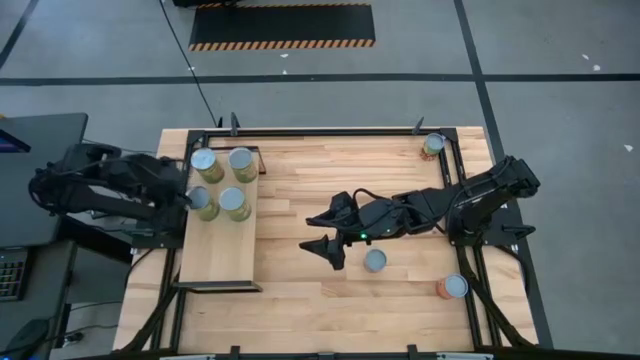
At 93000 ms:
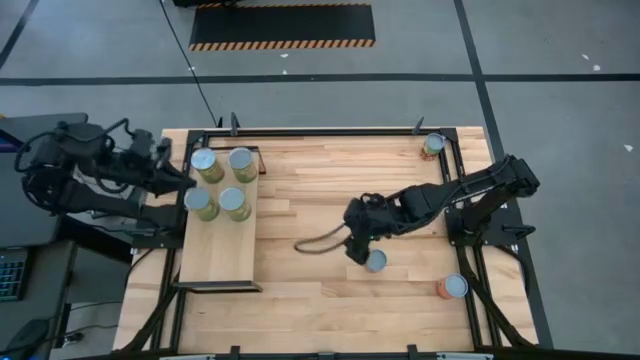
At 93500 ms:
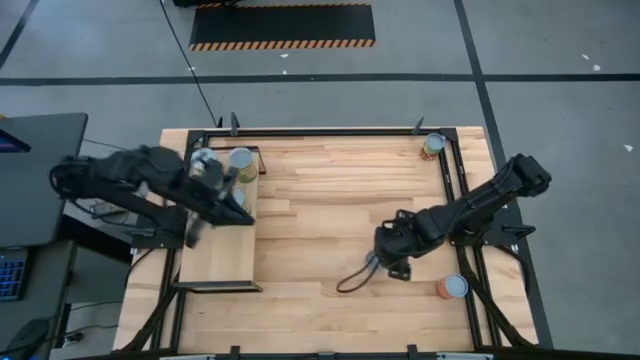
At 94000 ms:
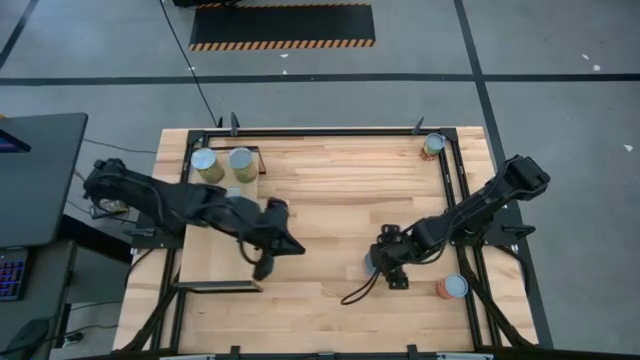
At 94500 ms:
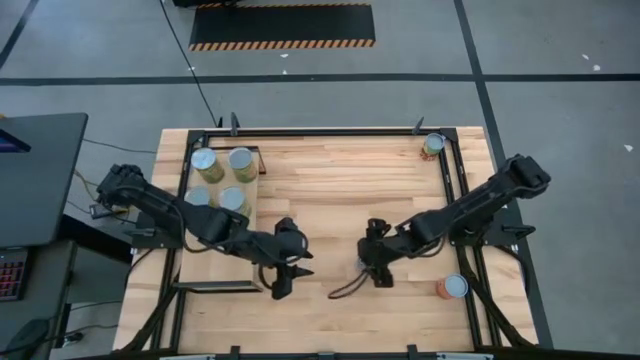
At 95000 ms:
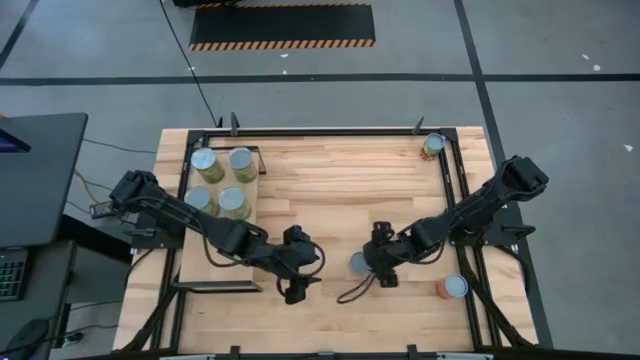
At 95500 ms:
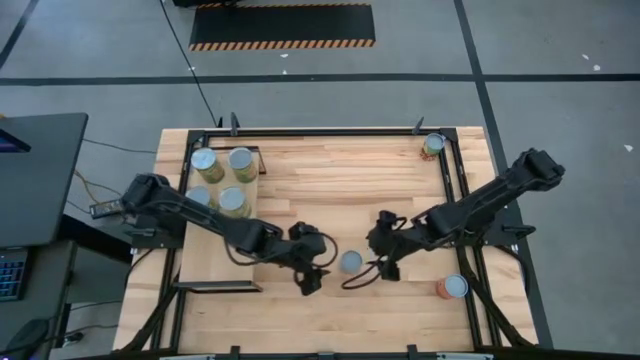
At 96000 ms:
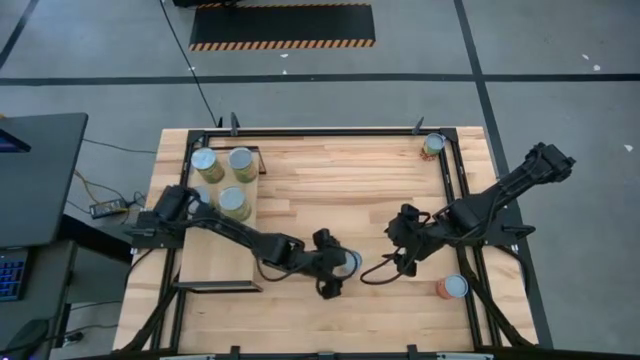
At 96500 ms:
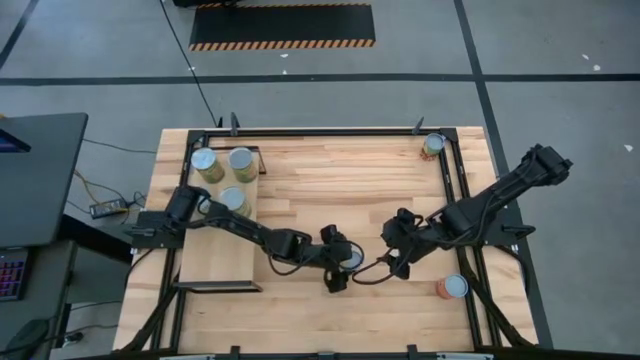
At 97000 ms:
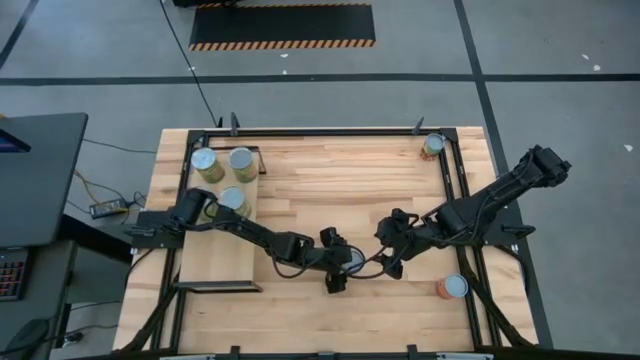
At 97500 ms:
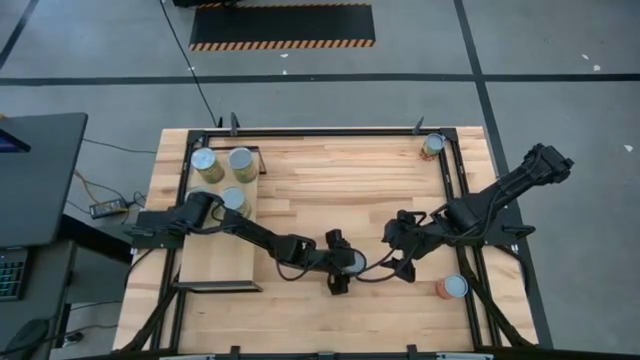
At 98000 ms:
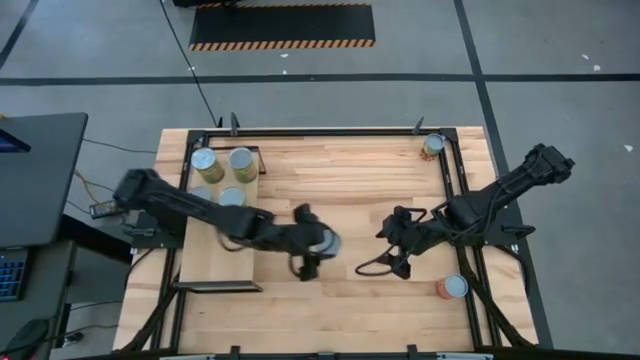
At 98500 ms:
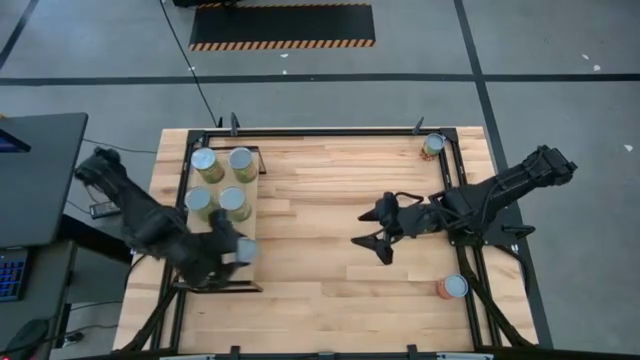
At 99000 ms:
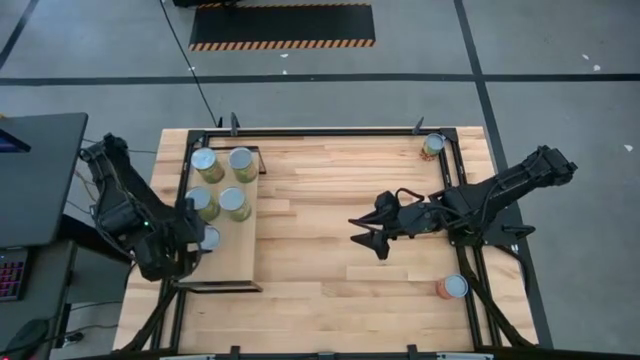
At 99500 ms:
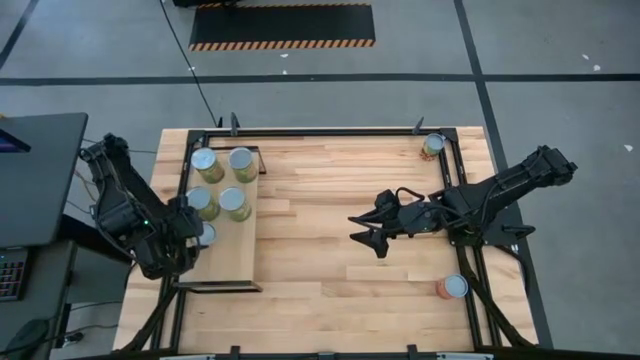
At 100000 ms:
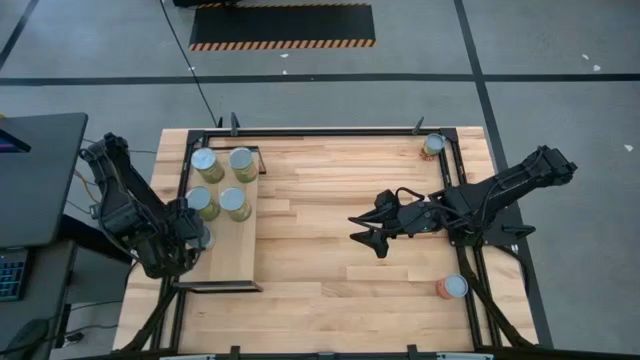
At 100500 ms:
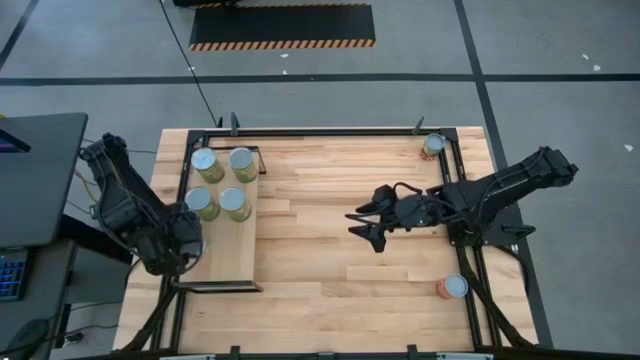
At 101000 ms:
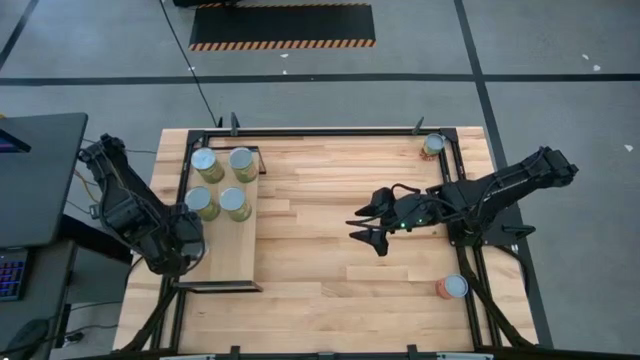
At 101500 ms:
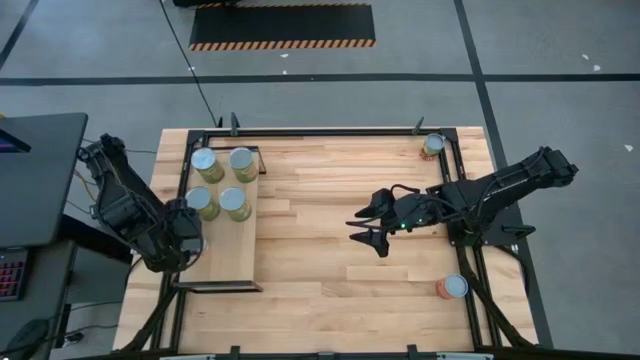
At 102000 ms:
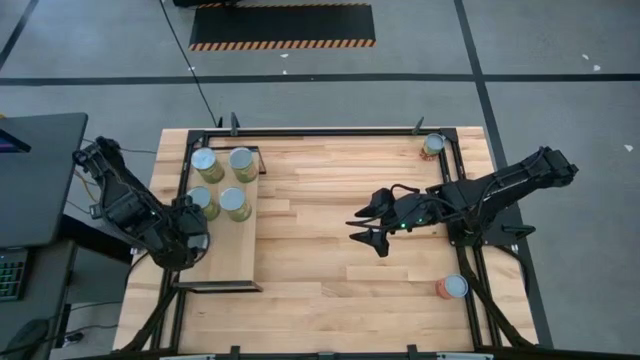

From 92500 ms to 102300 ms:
Task: Pick and place cans onto a shelf
Put the small canned oranges on the shelf

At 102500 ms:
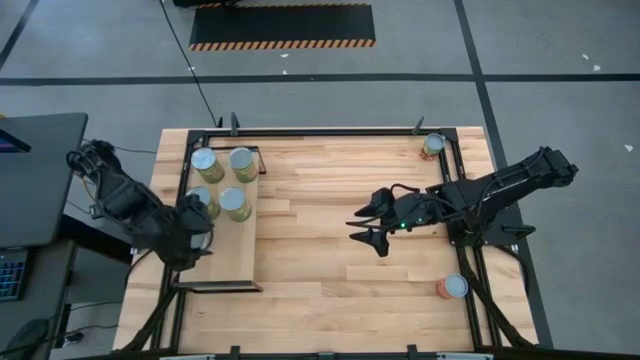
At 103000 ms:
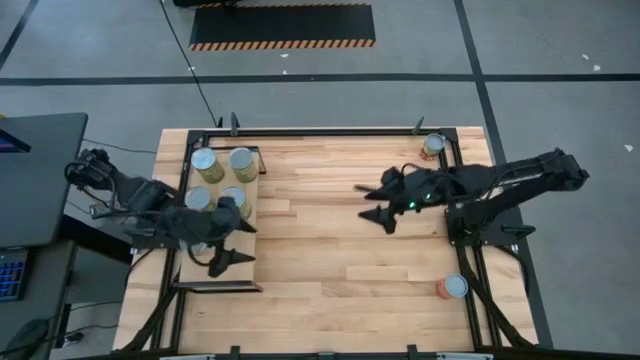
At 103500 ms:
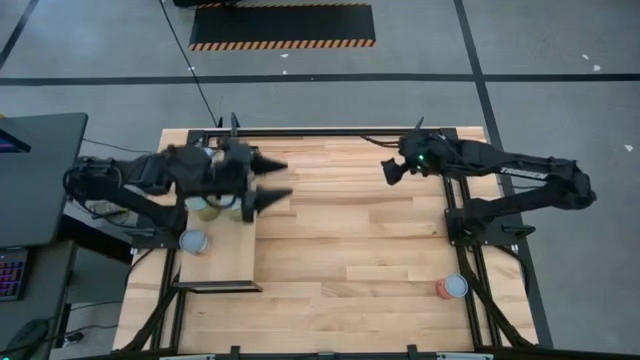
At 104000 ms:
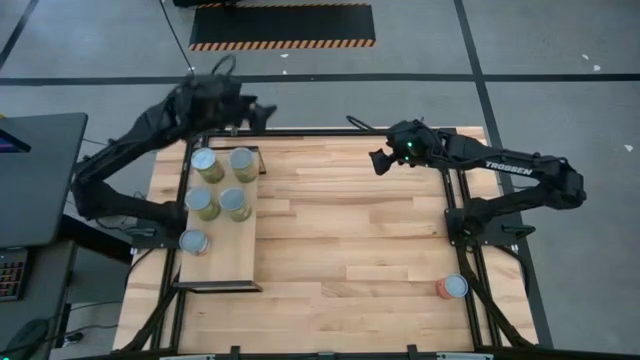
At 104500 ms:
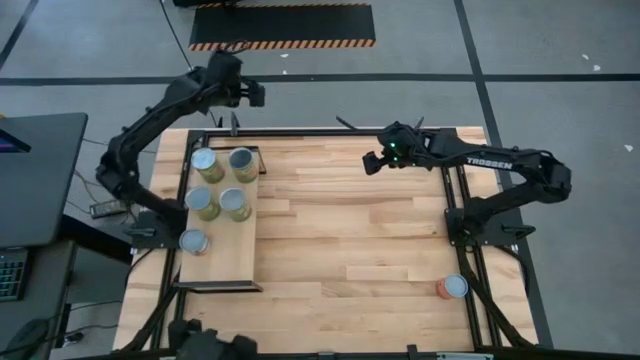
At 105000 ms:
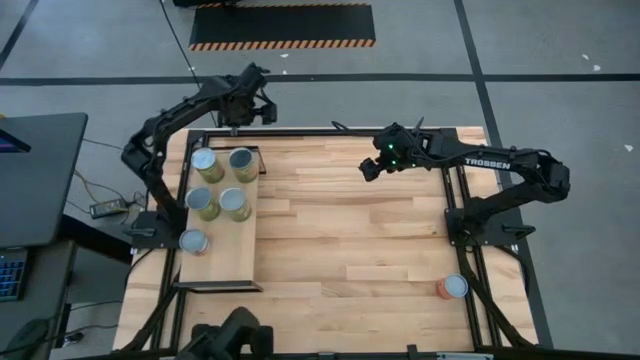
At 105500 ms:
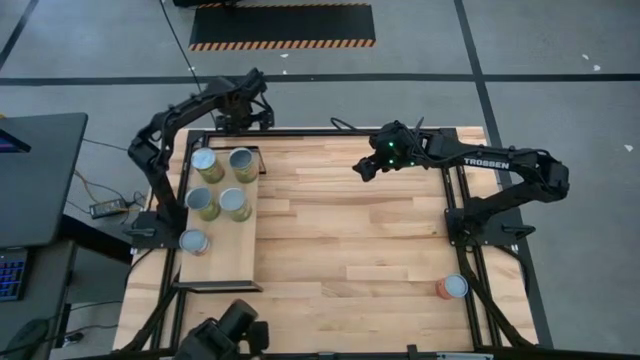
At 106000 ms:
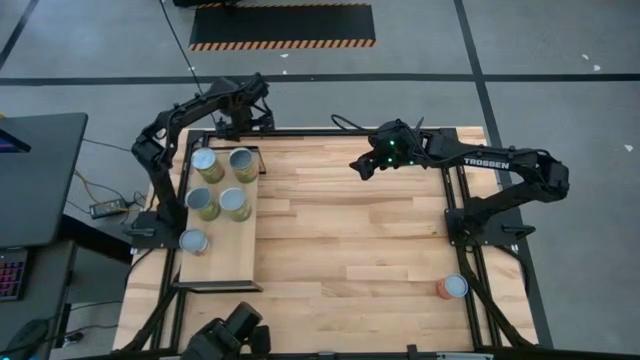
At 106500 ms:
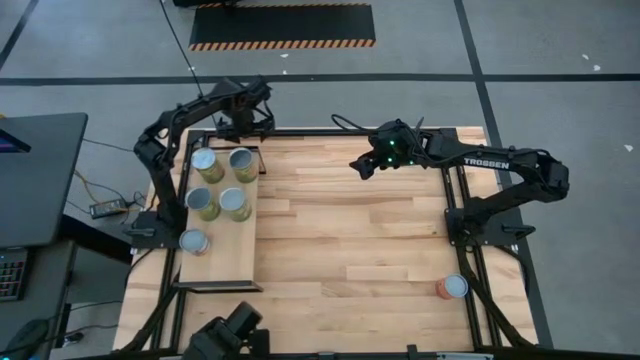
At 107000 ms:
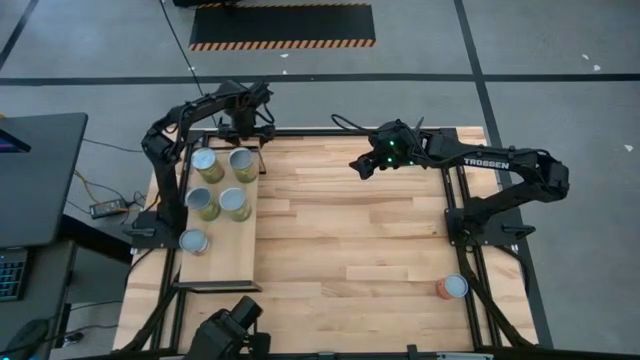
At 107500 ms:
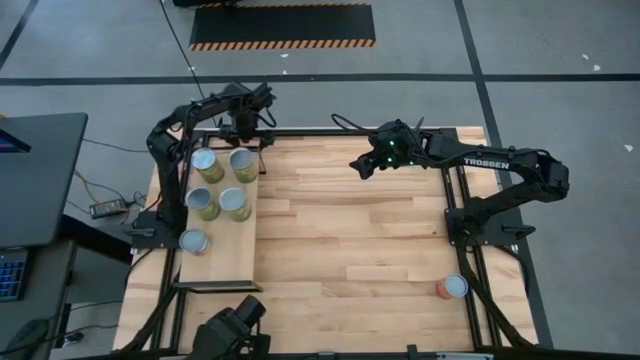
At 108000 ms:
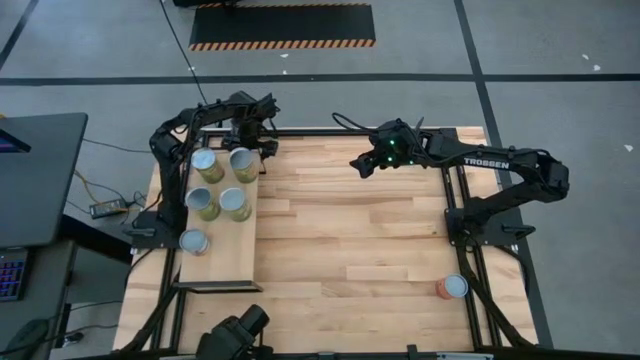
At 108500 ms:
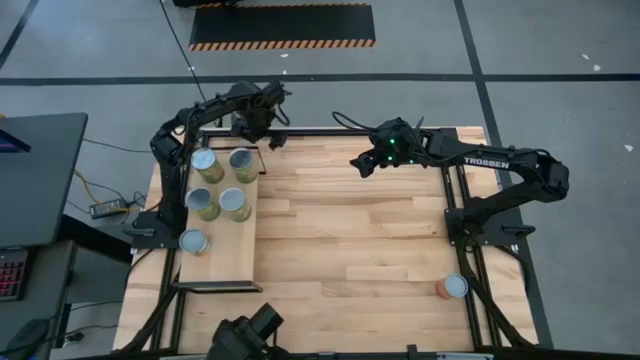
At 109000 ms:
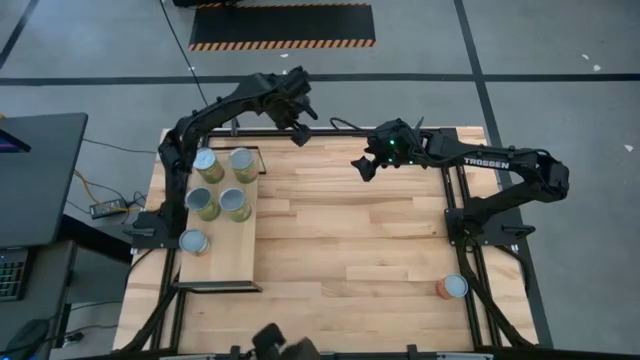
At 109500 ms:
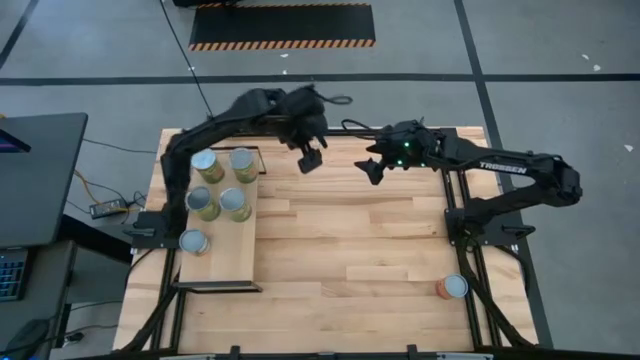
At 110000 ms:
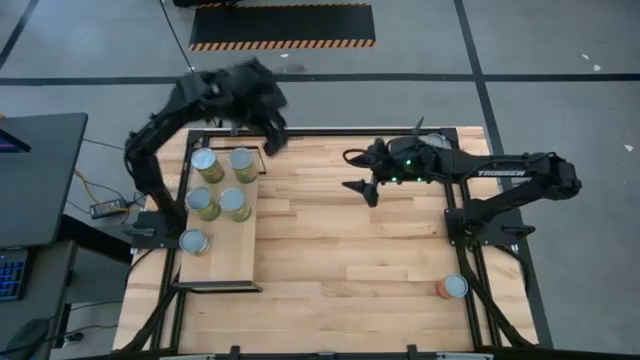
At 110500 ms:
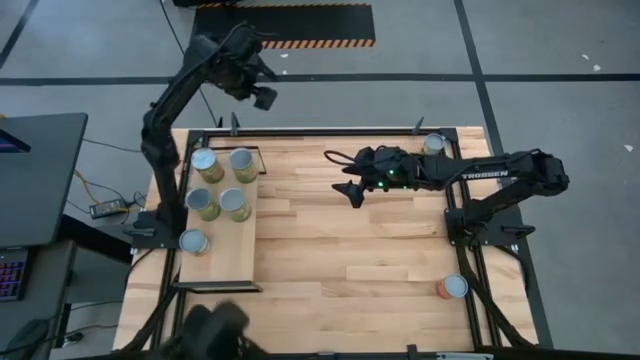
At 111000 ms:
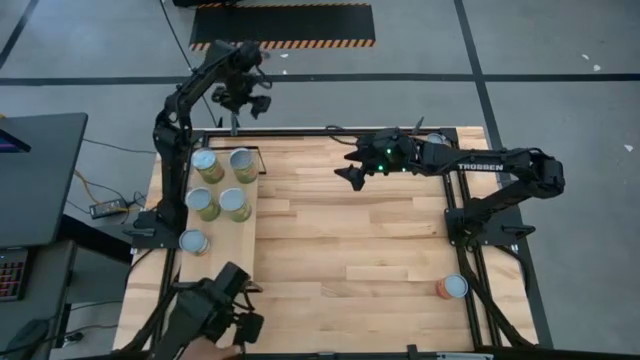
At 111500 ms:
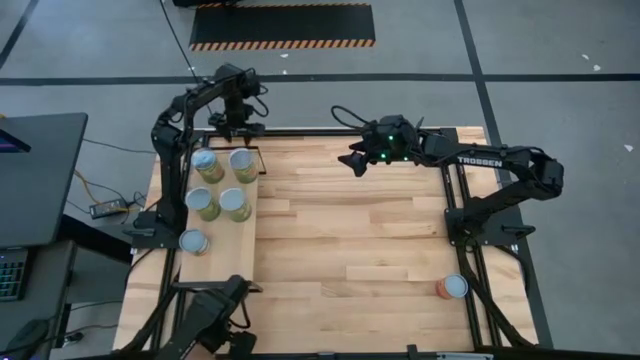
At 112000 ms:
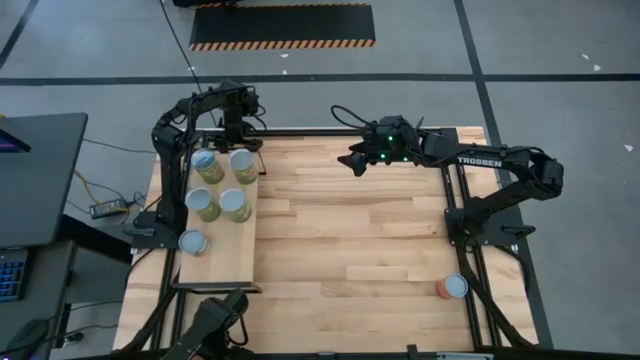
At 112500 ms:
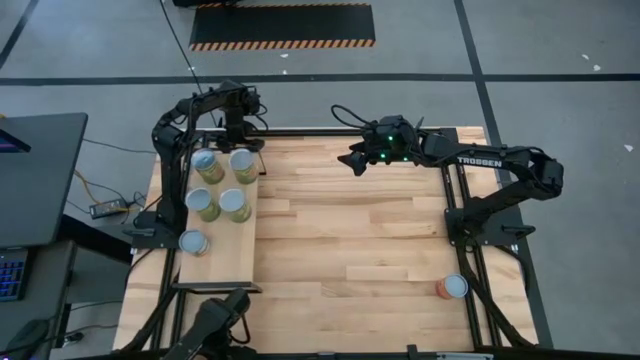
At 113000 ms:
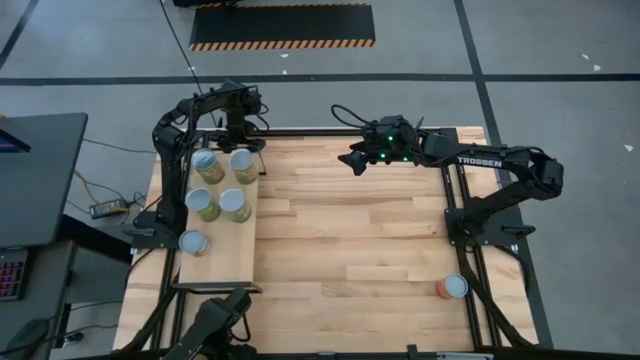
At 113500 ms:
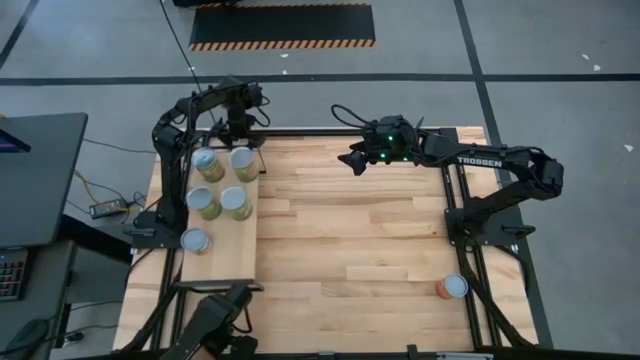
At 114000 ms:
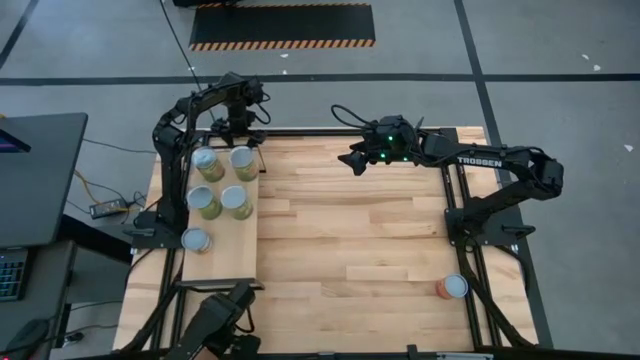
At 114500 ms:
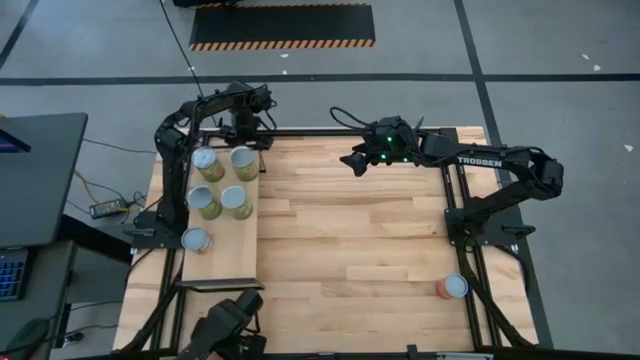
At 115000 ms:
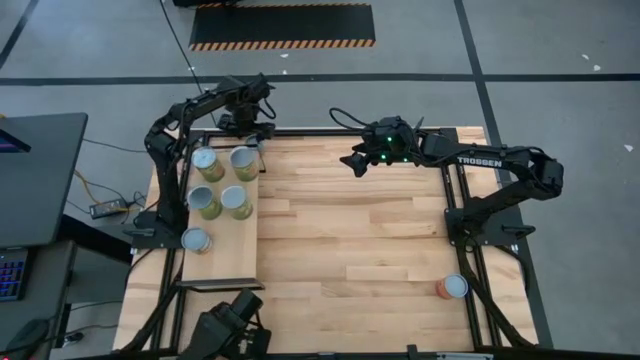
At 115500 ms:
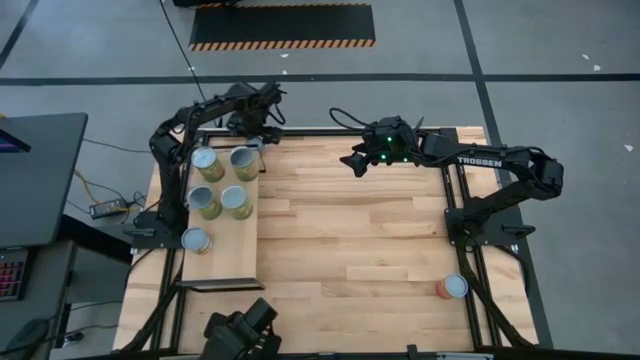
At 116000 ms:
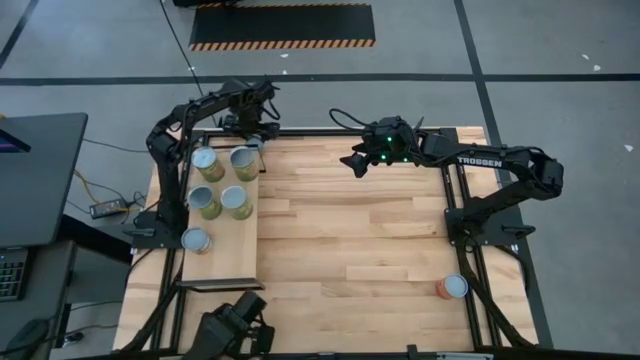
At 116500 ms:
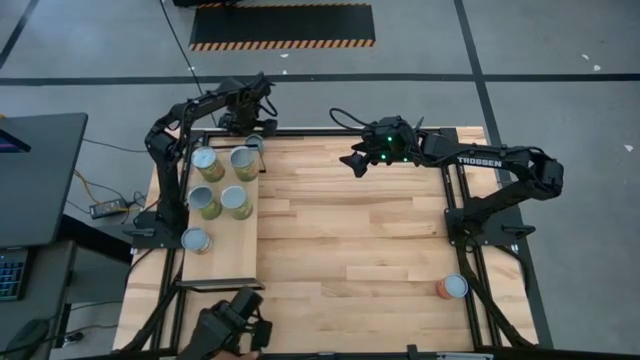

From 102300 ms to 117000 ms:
Put the canned corn on the shelf
